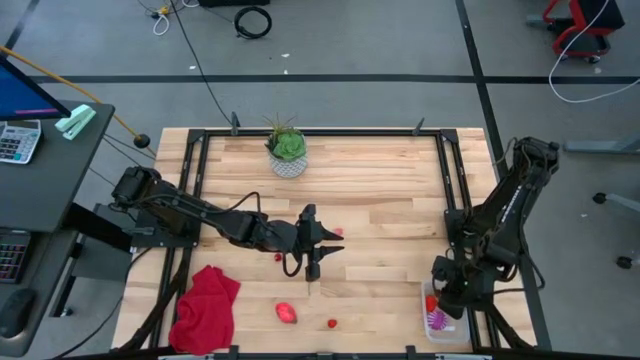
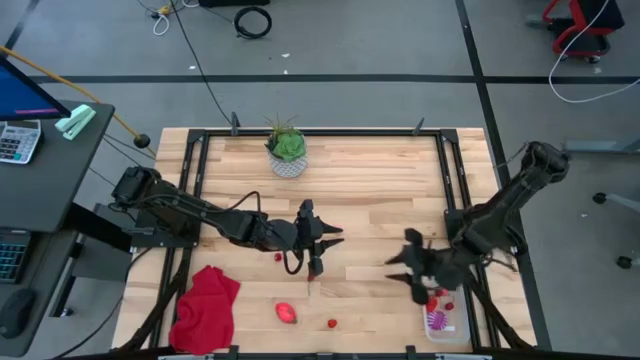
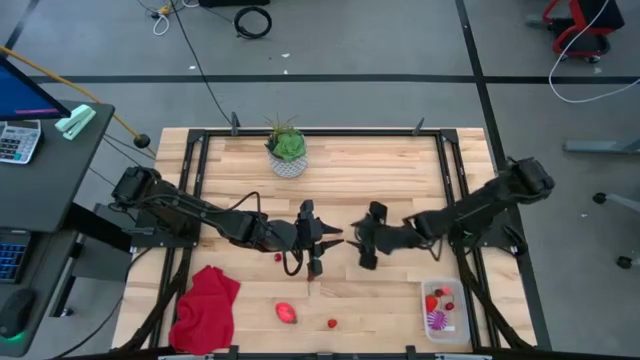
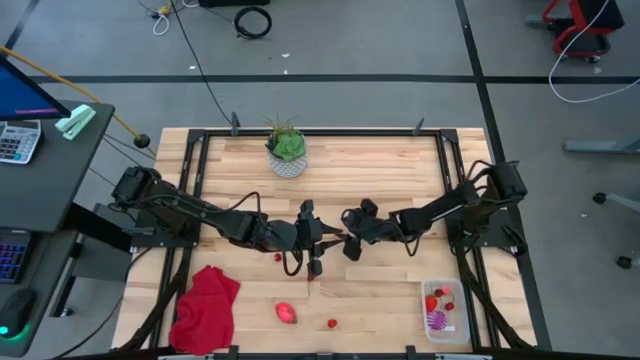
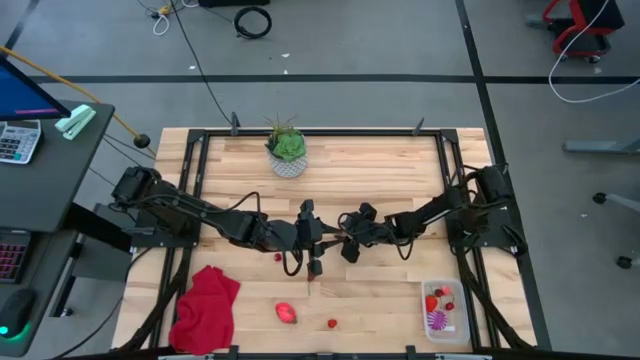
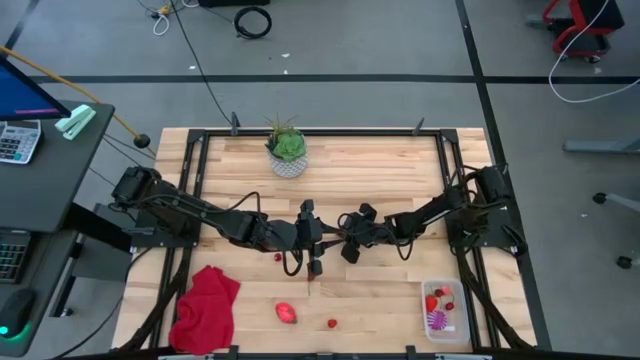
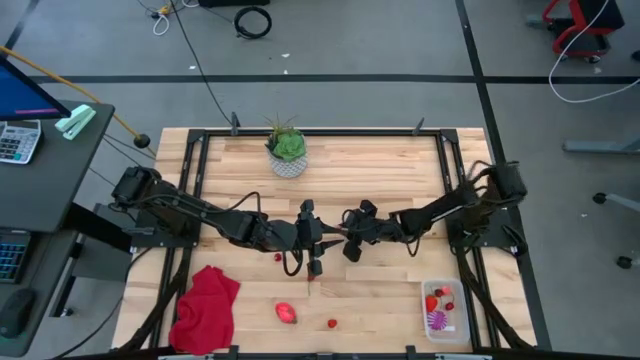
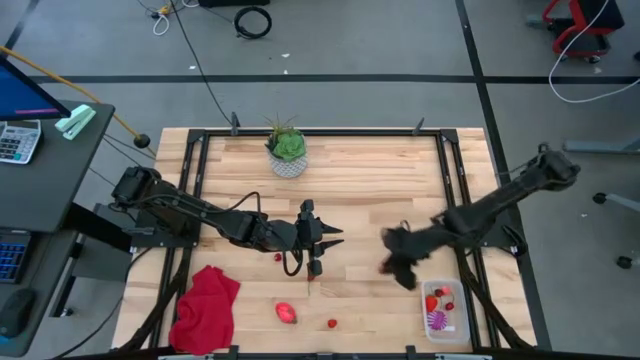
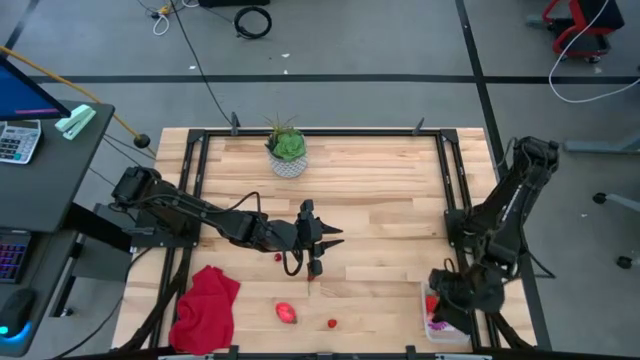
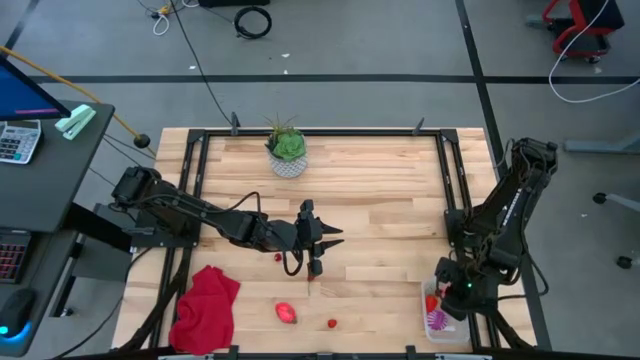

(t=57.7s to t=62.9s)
Task: Pick and placing Produce into tupperware
Put the pink peach into the transparent container

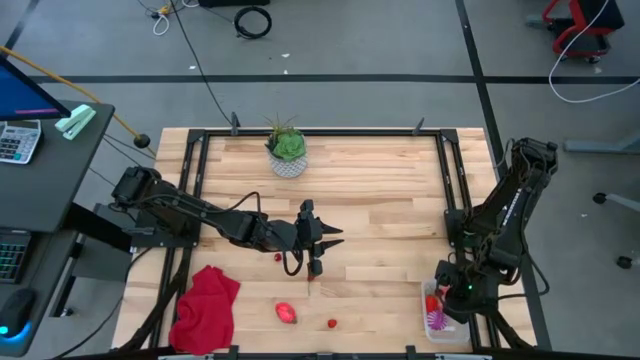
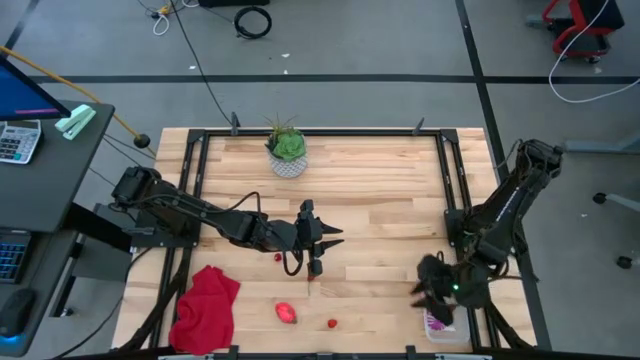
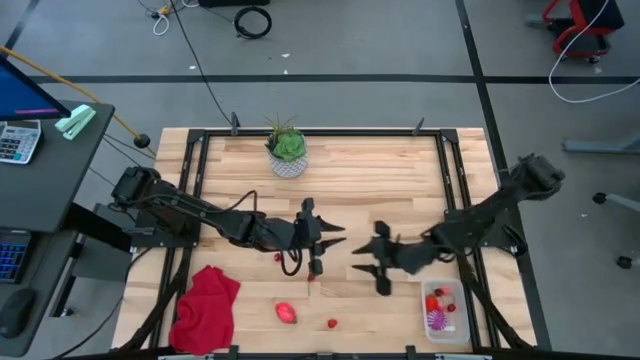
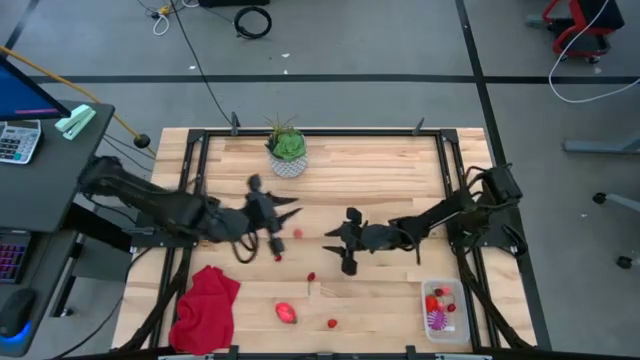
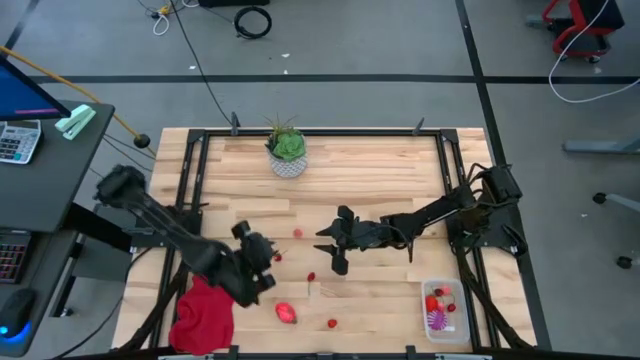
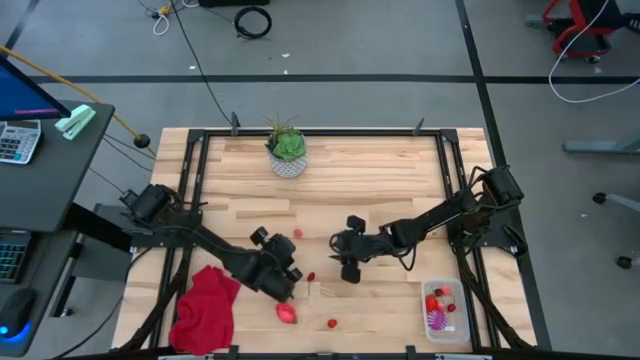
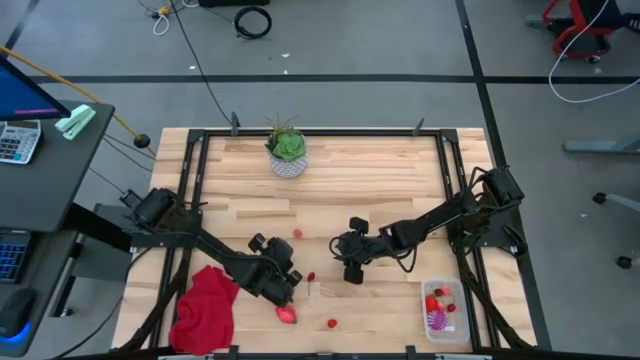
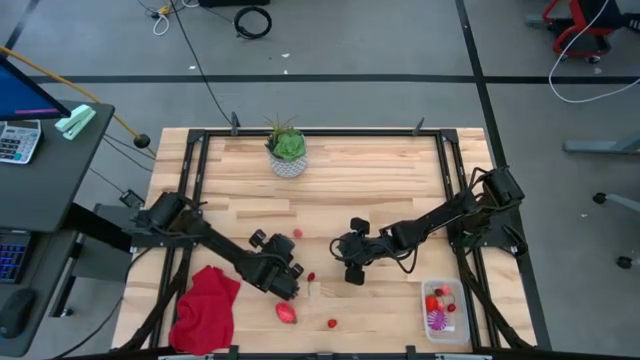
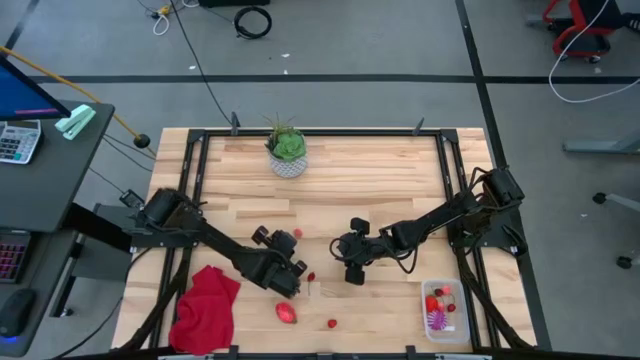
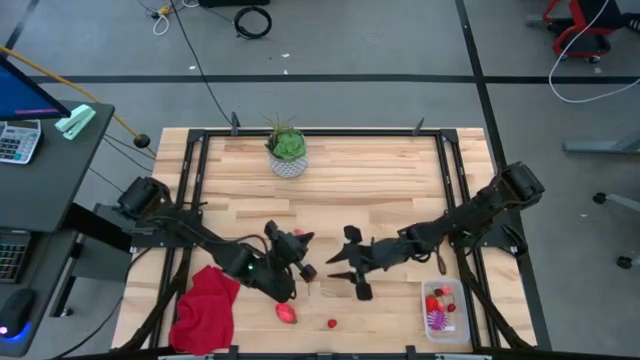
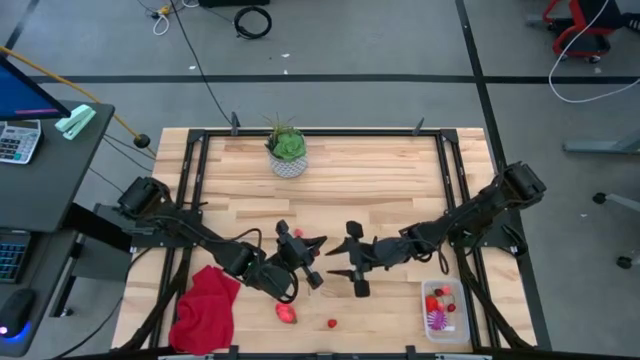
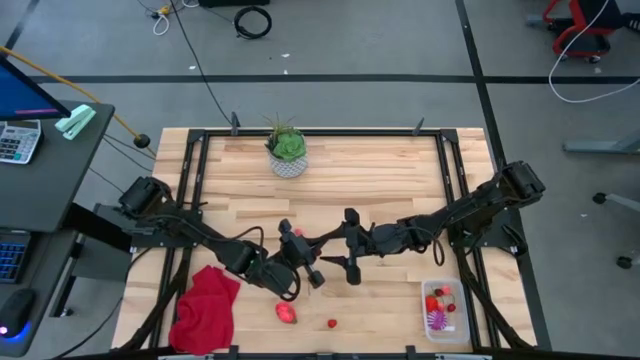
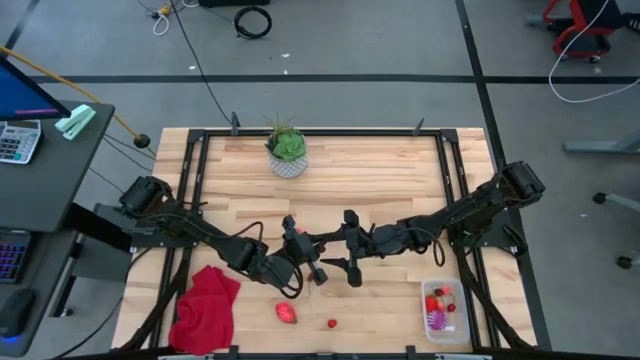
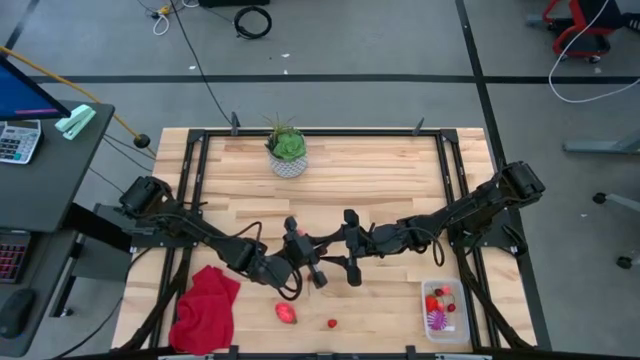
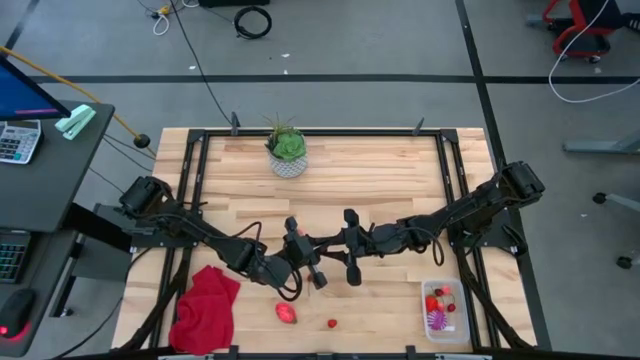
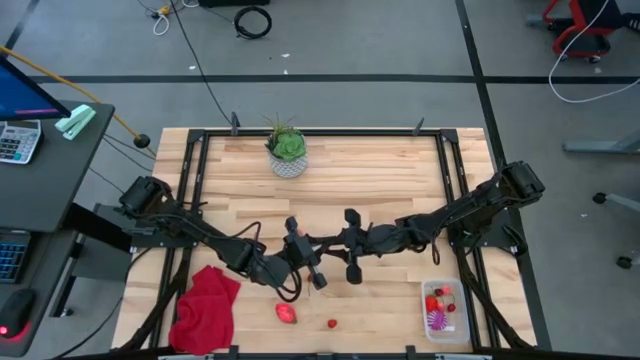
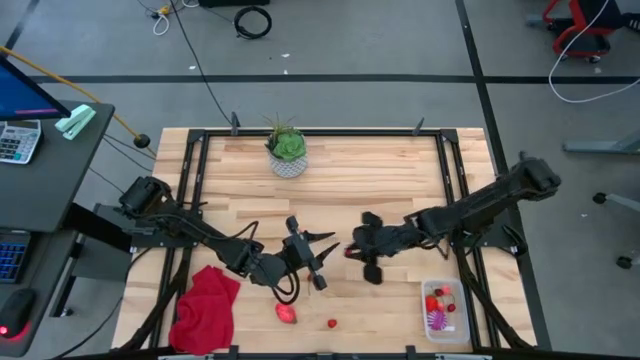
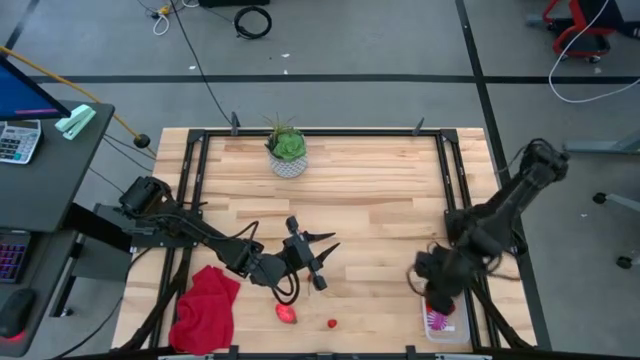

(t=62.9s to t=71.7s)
Put the red cherry into the transparent container

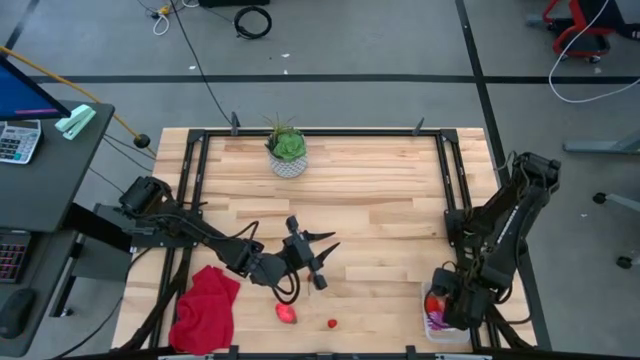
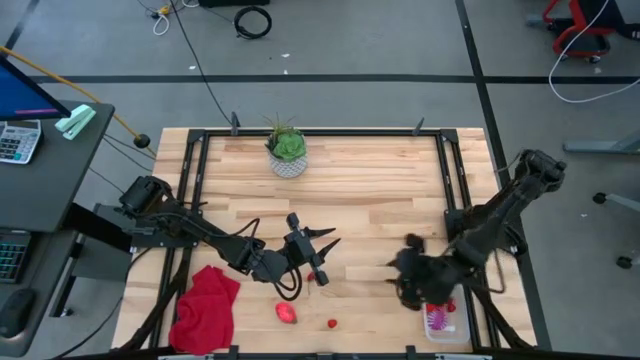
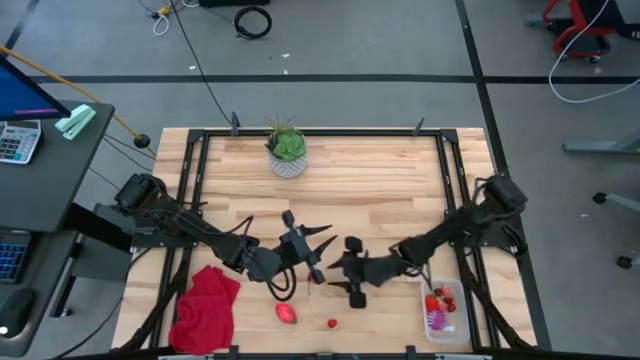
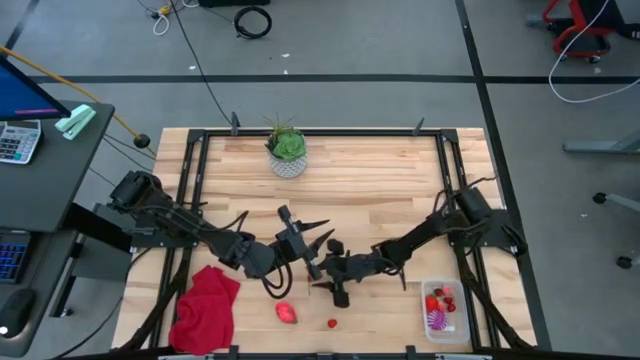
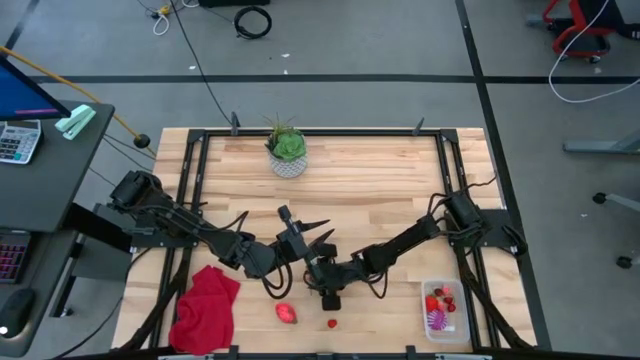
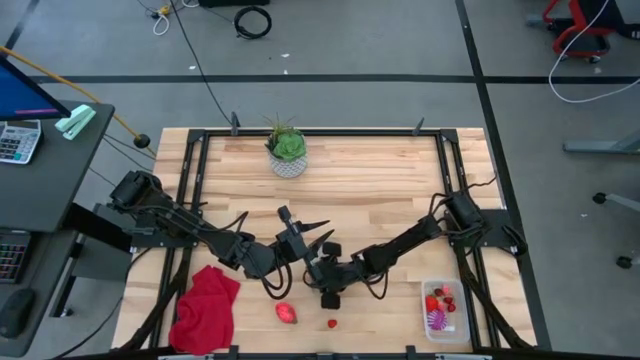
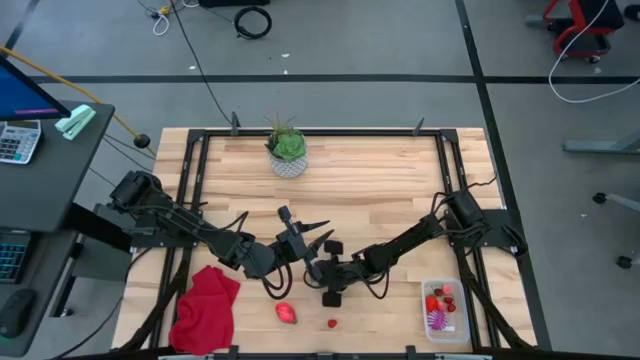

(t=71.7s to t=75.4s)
Put the red cherry into the transparent container

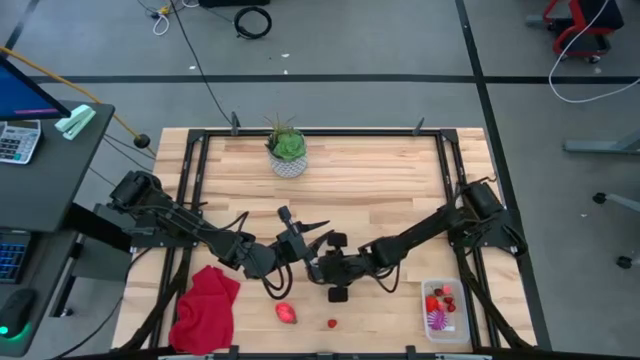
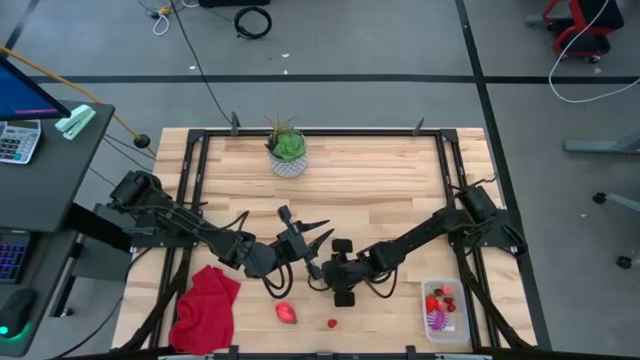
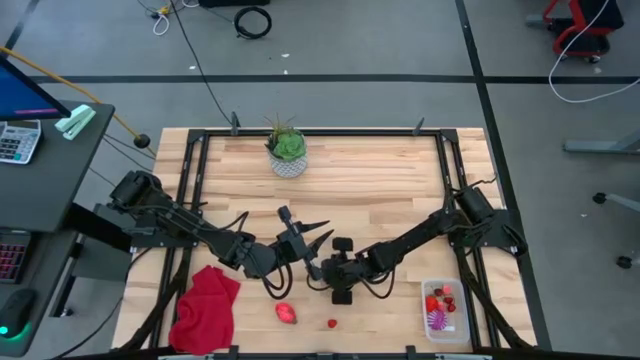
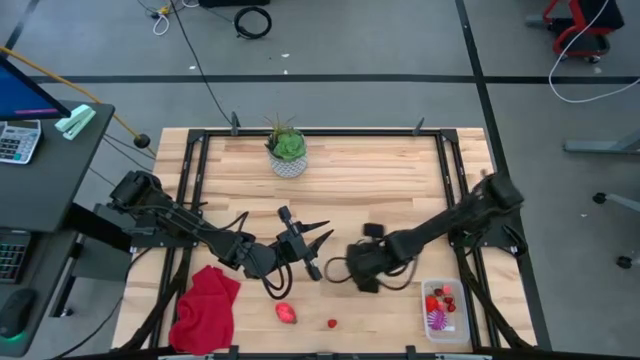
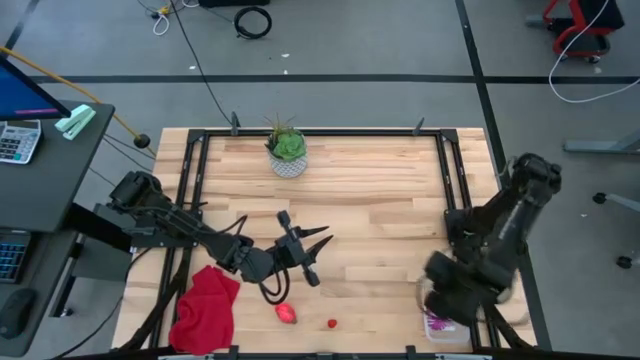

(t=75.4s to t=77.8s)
Put the red cherry into the transparent container

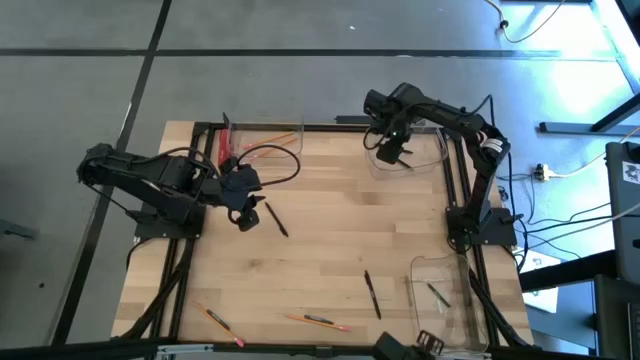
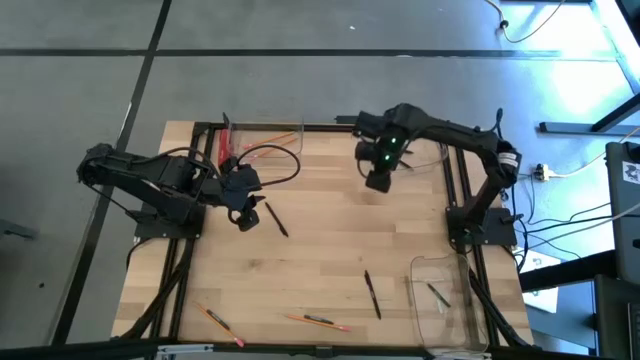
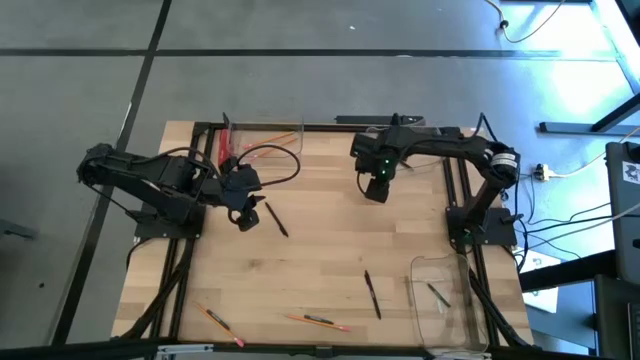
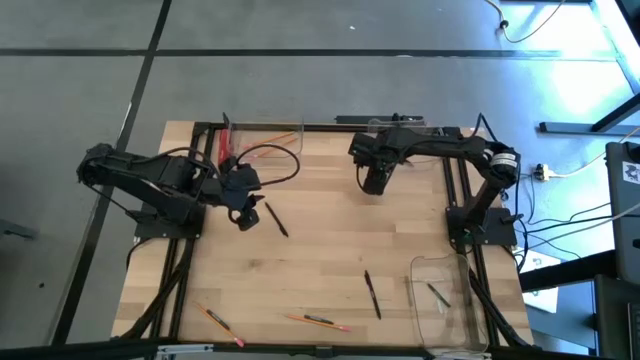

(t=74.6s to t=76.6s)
Task: Sort crayons/erasers/pens/pencils in bins
Move the top right transparent bin to the top of the table
